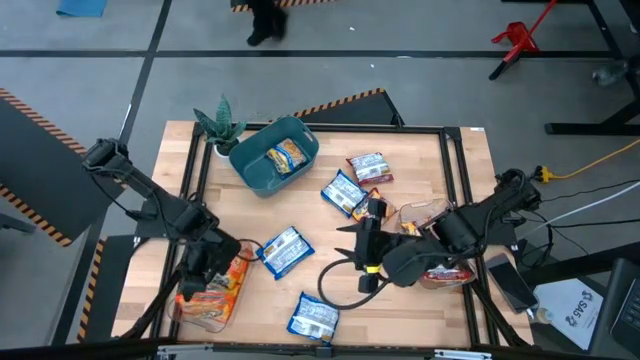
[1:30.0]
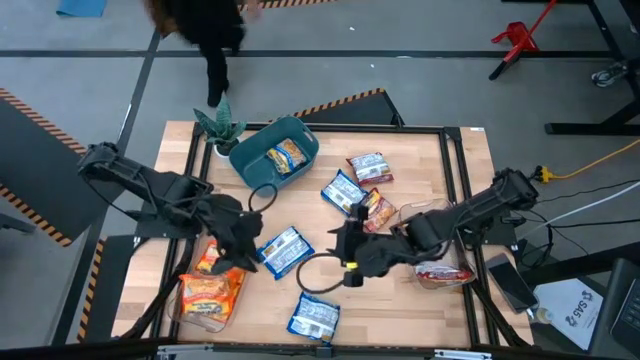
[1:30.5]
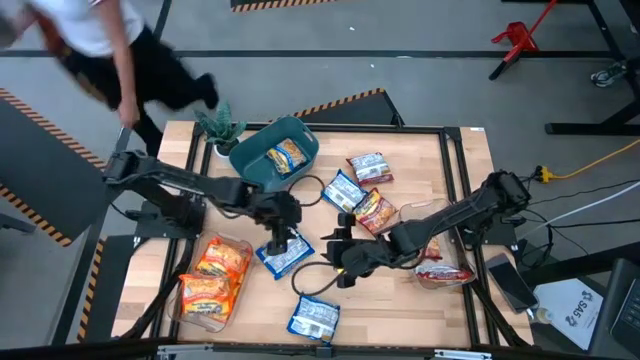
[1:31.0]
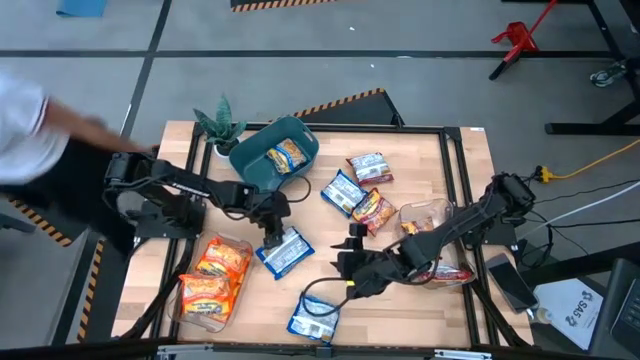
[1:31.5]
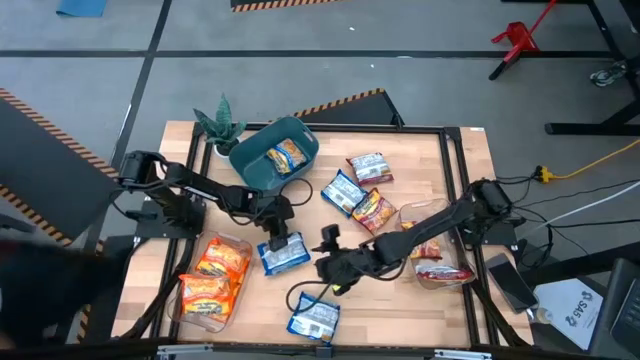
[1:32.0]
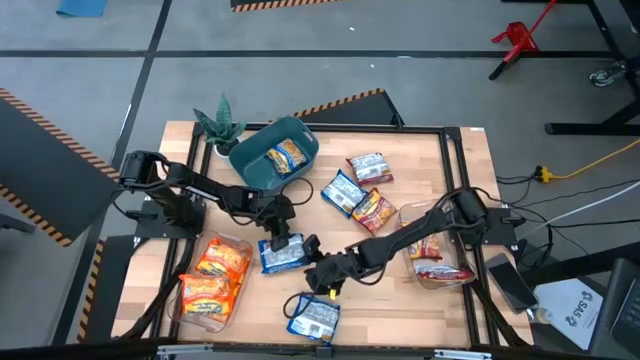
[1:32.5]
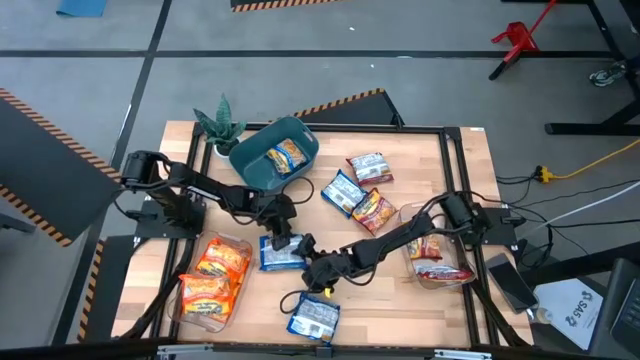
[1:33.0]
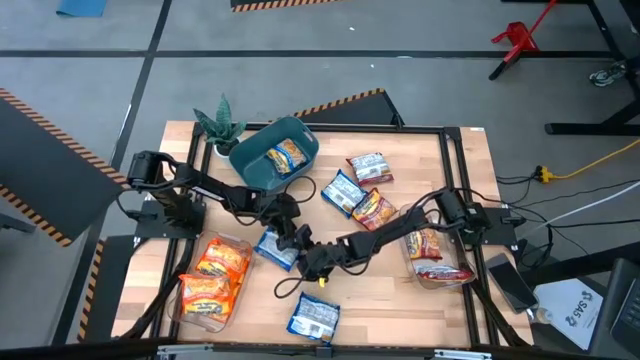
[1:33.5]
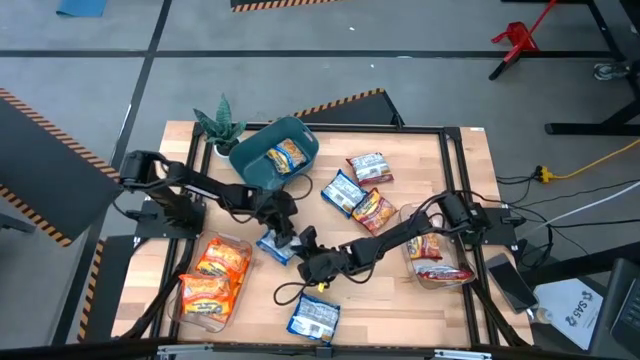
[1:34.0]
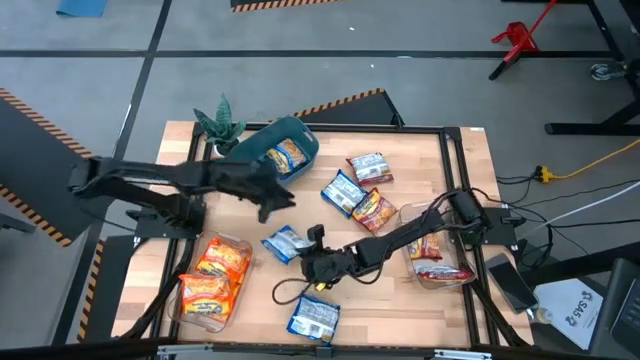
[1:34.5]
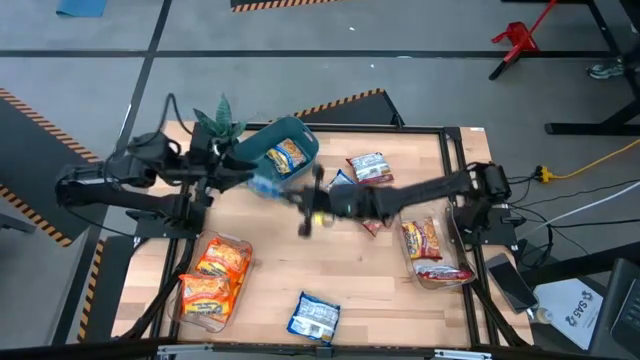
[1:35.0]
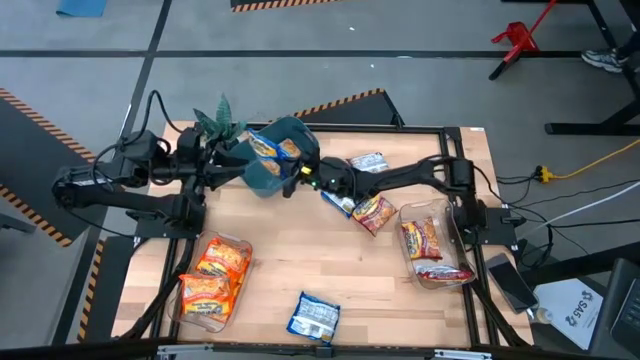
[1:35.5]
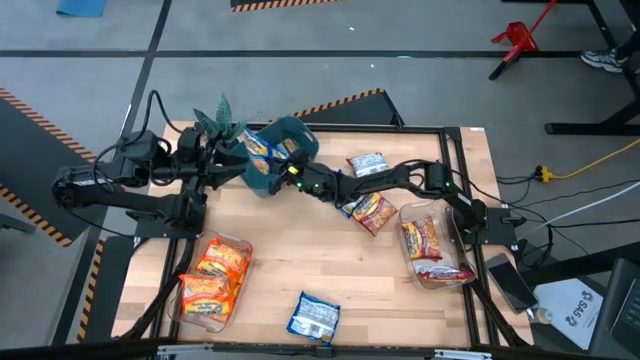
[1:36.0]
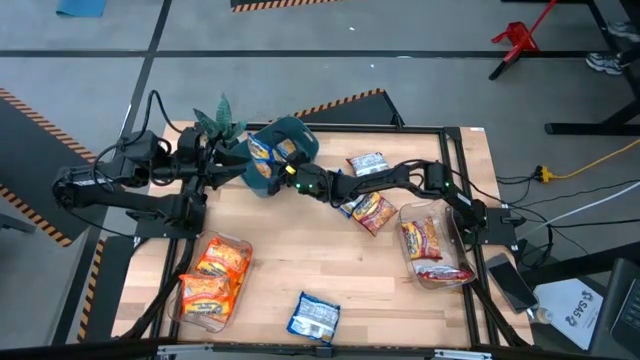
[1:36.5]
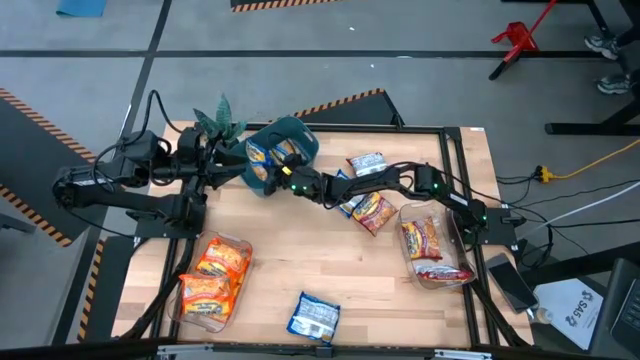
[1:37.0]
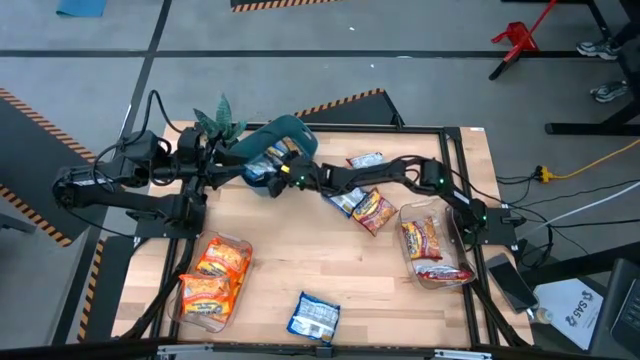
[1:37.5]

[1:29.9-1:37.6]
Task: Sort Maruchan noodles
Put the blue noodle pack into the blue bin

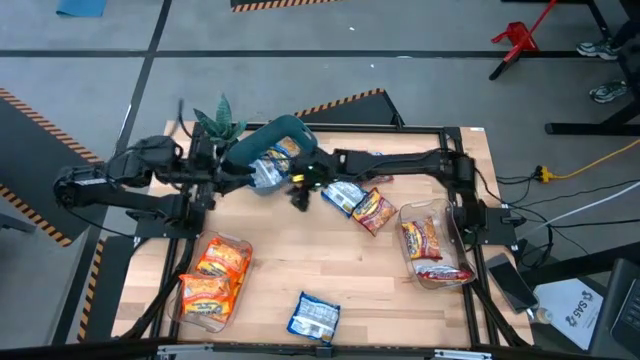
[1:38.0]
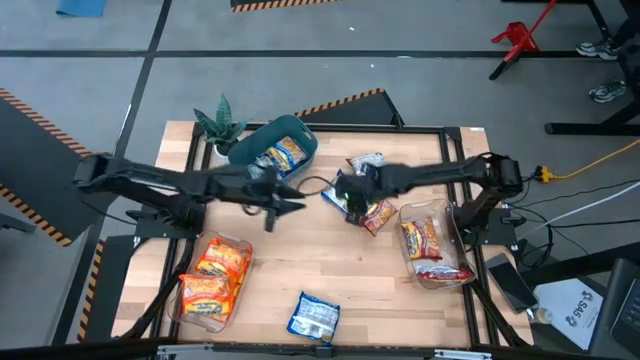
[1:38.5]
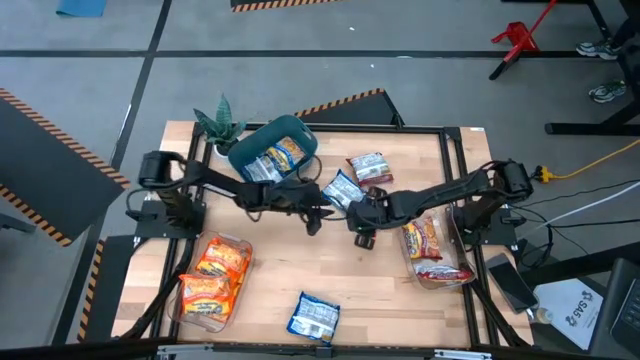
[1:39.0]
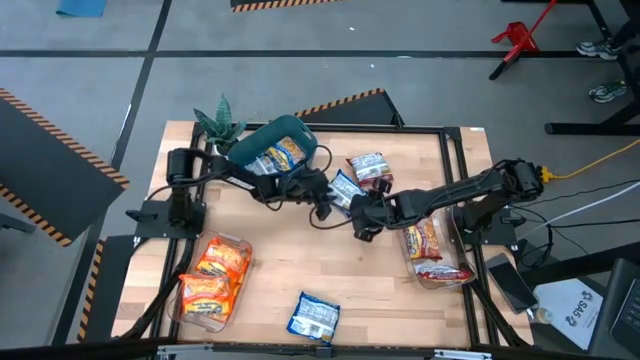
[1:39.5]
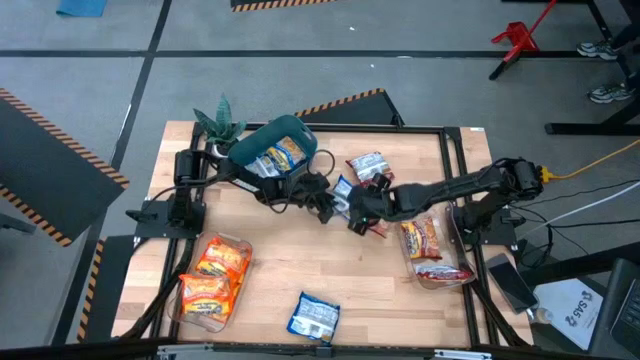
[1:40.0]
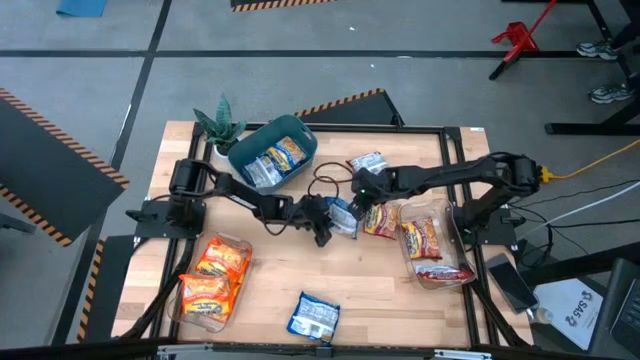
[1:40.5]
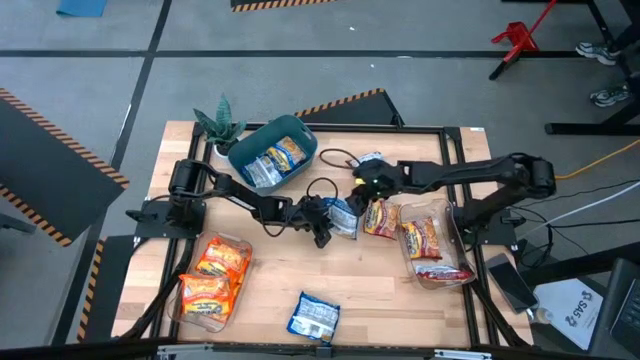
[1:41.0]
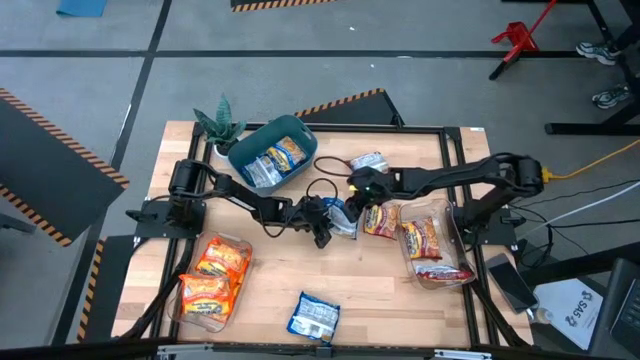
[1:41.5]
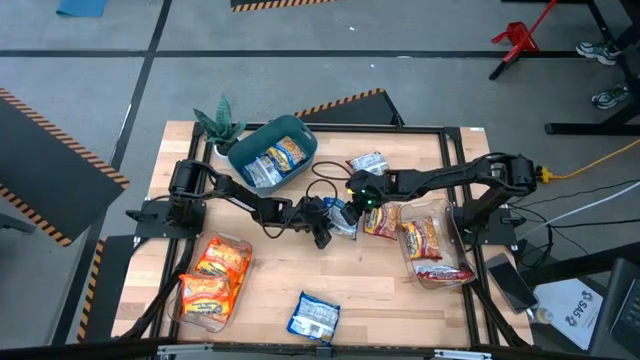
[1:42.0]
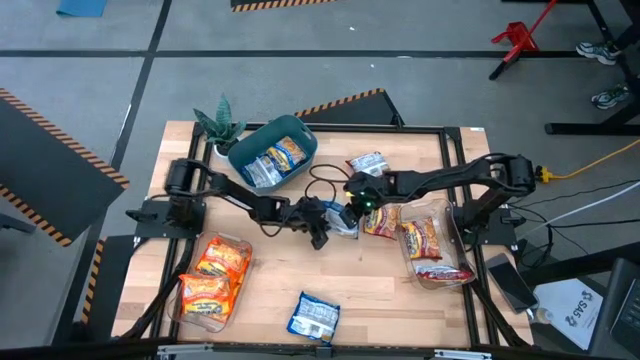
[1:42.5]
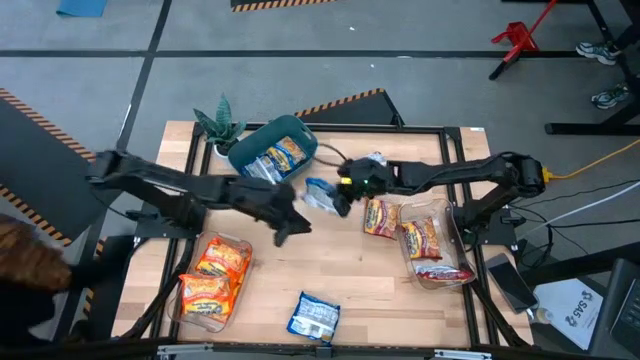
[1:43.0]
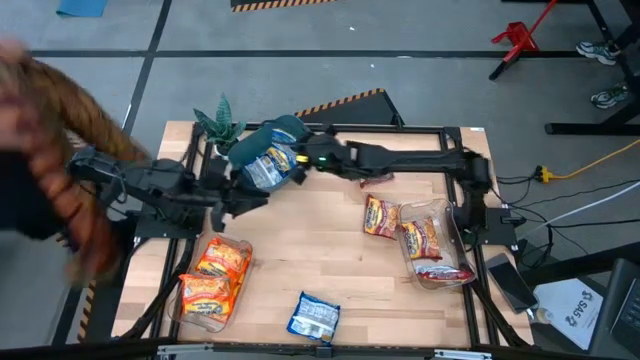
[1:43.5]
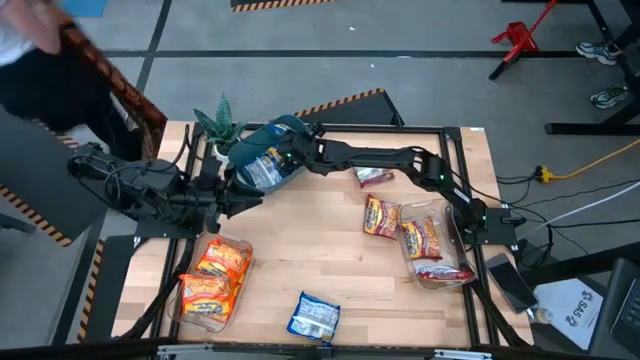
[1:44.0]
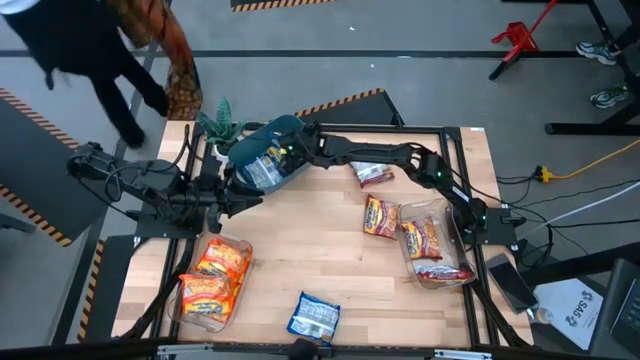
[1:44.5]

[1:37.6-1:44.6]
Put the blue noodle pack into the blue bin

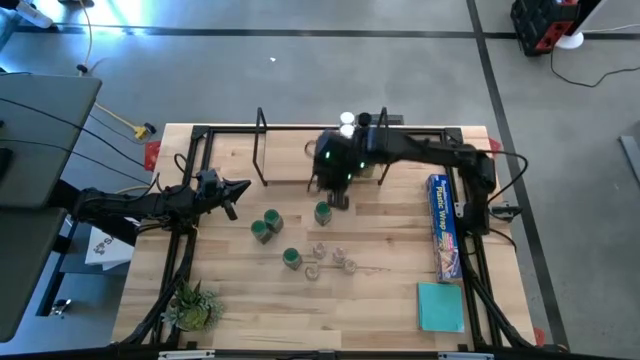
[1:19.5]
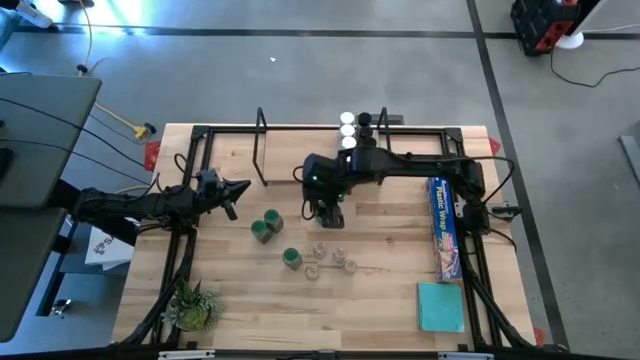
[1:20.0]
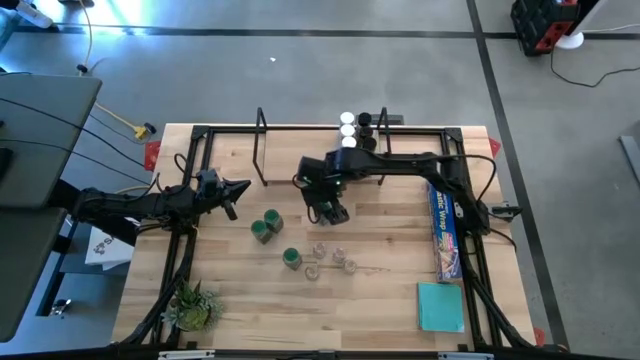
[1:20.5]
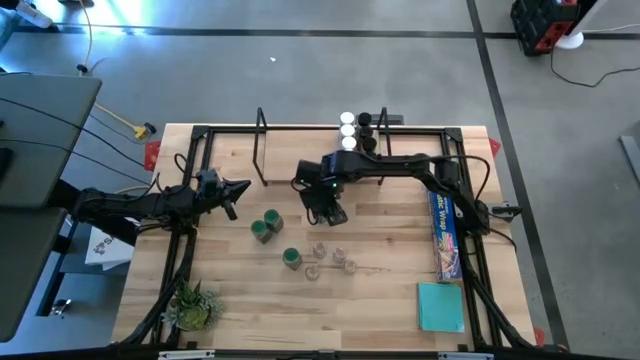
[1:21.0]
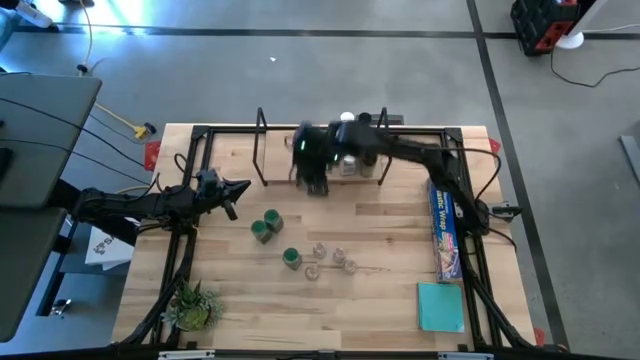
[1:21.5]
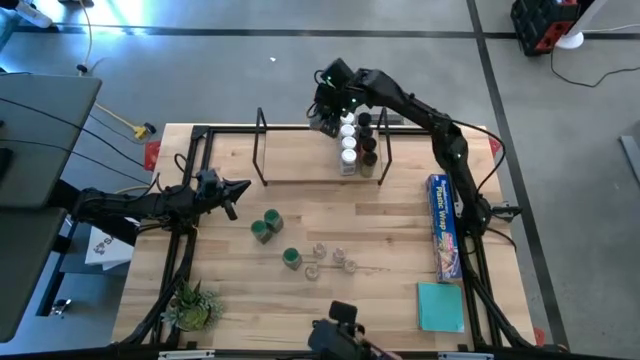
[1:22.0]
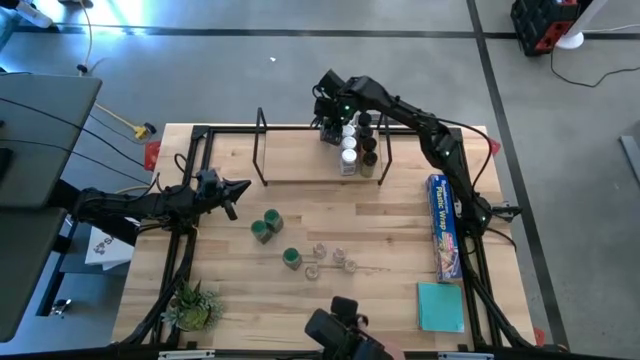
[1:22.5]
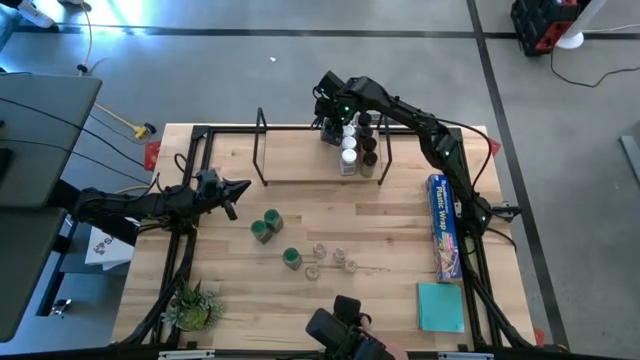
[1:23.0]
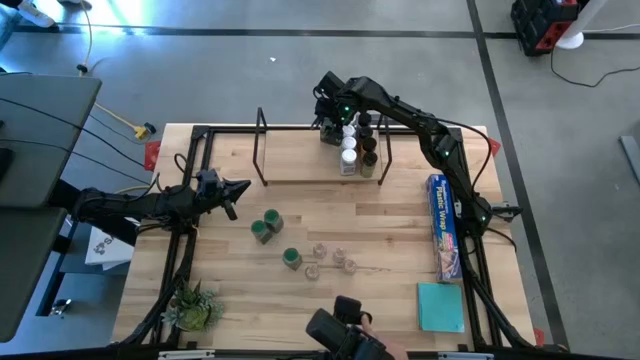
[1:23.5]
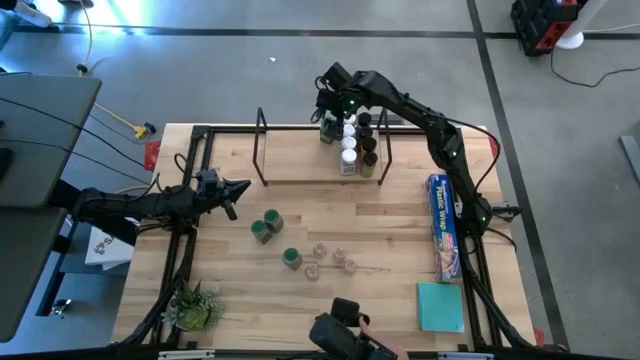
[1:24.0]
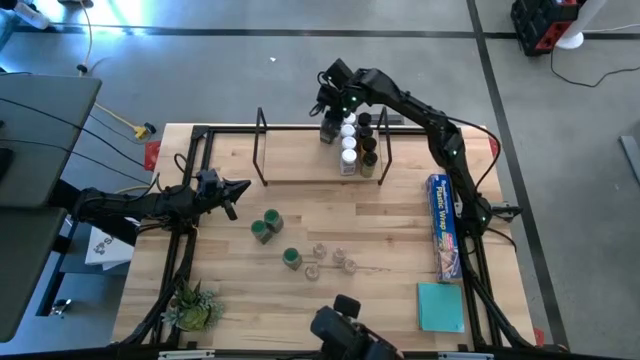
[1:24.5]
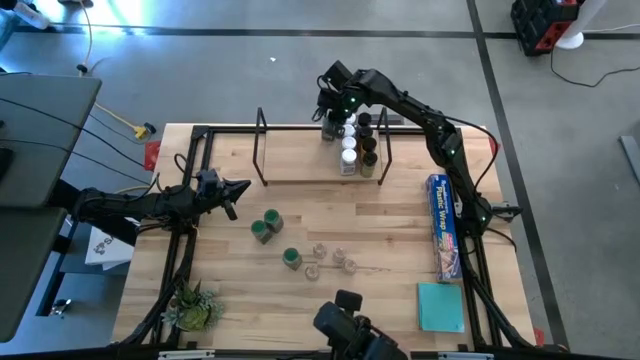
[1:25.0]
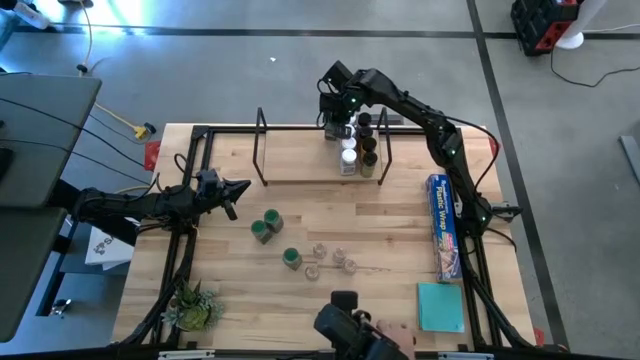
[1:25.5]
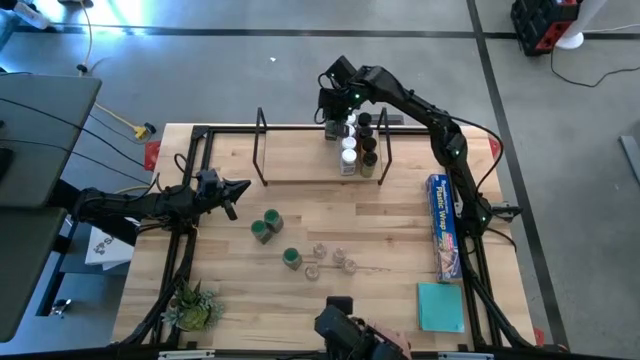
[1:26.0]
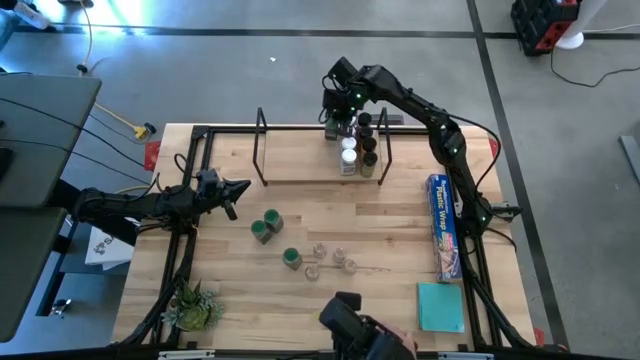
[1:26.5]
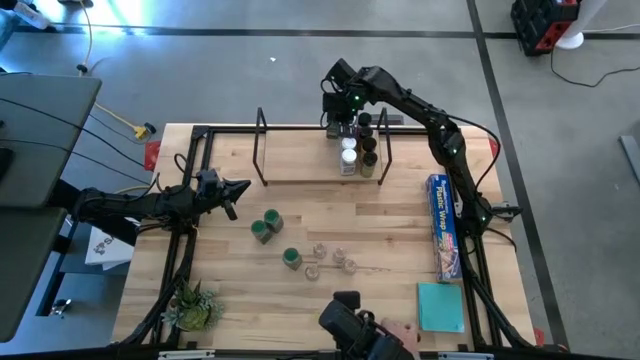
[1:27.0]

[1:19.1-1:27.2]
Task: Shelf spices
Put the top right green seasoning bottle on the shelf
